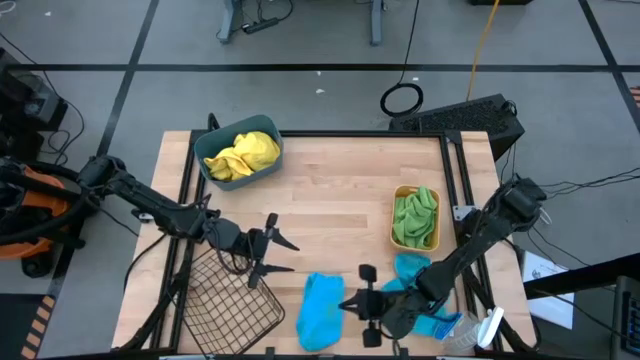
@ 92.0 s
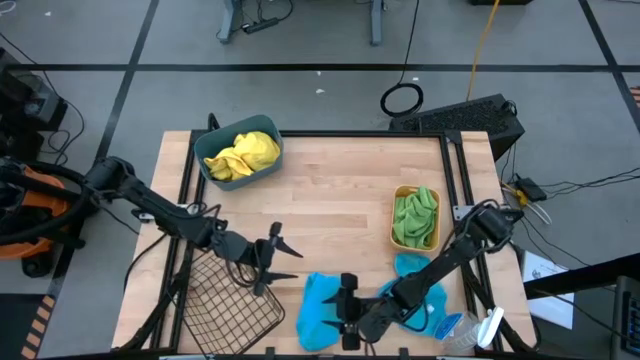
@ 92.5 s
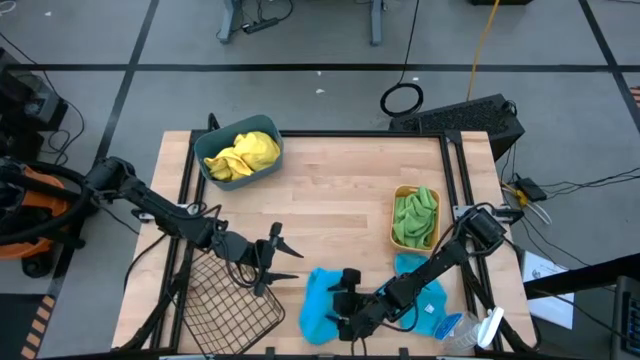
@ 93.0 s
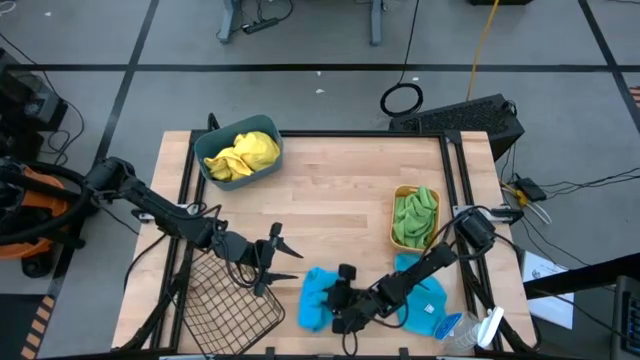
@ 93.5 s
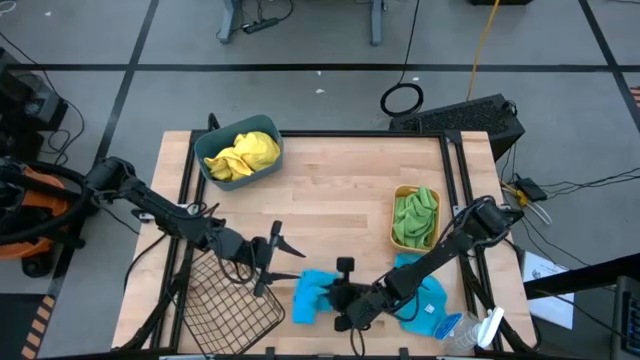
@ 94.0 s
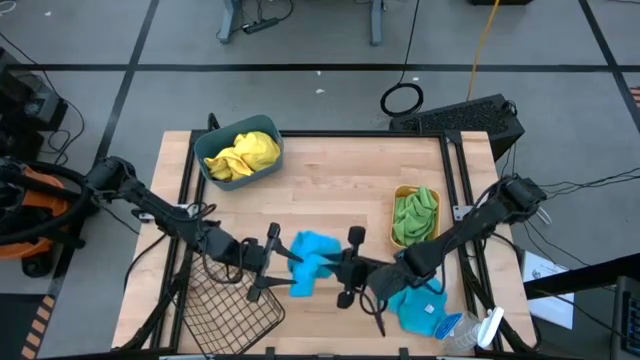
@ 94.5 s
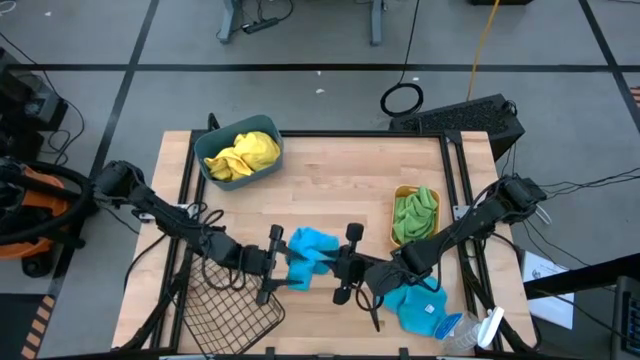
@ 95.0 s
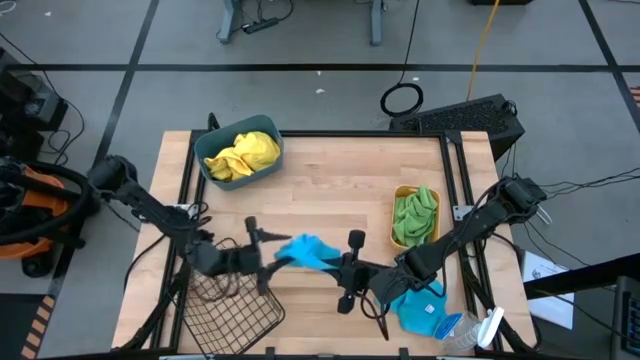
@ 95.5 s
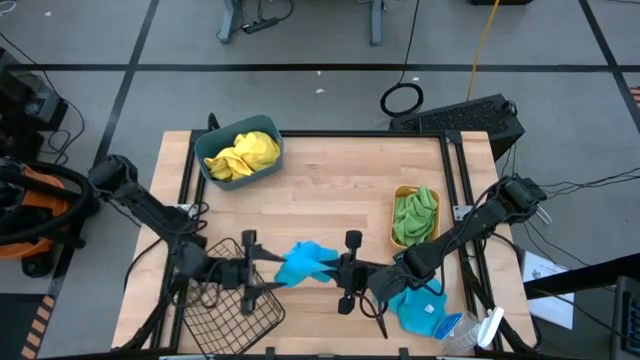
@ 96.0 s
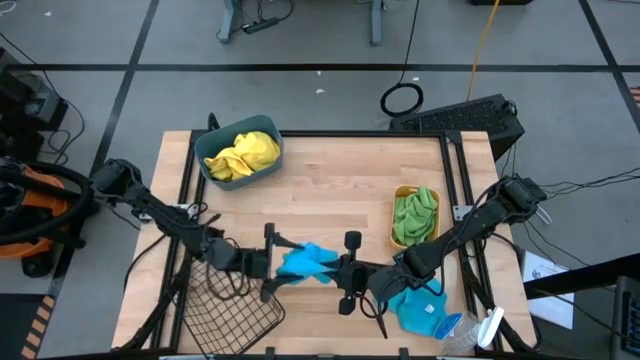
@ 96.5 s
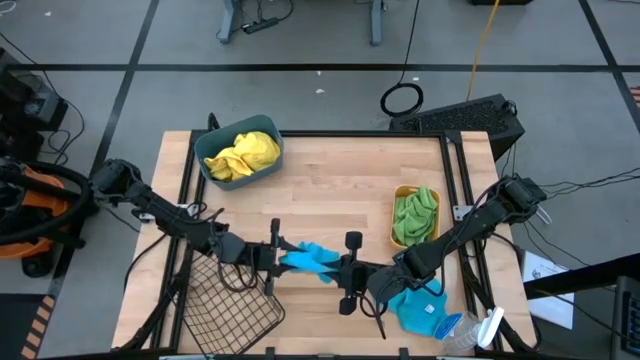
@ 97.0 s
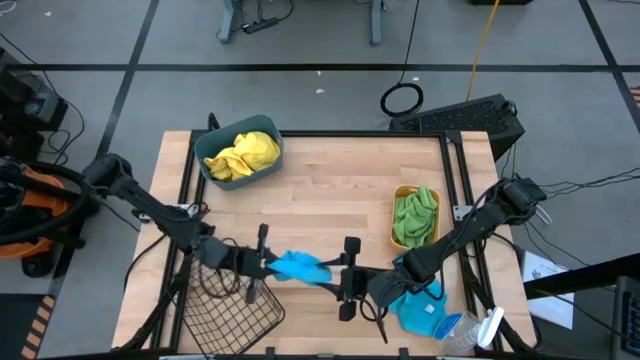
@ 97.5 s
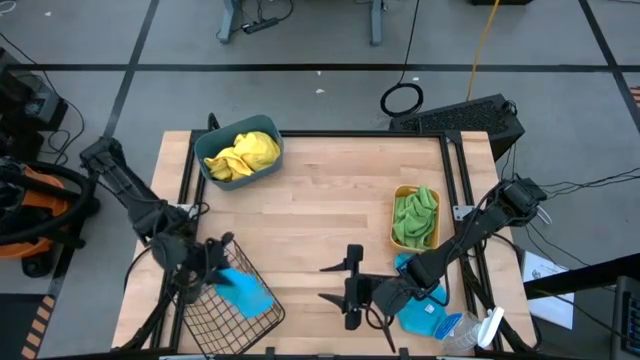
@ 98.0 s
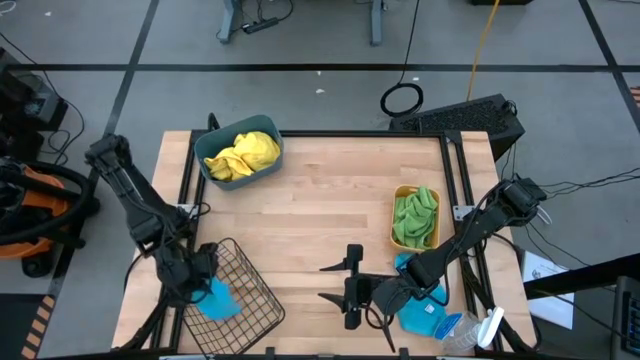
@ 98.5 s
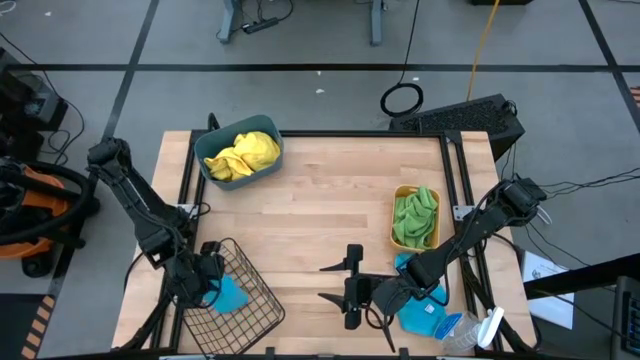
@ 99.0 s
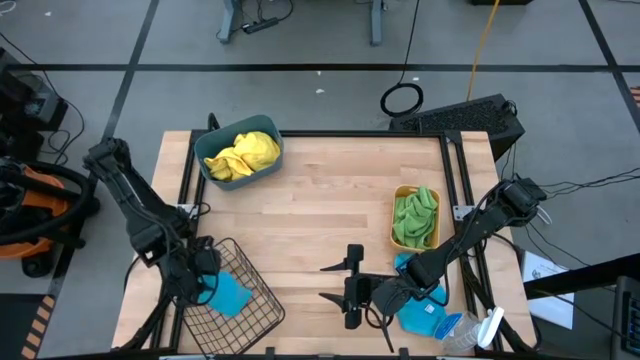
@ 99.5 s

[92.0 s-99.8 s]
Task: Sort microfiber towel by color & place in baskets
Put lower left blue towel into the black basket

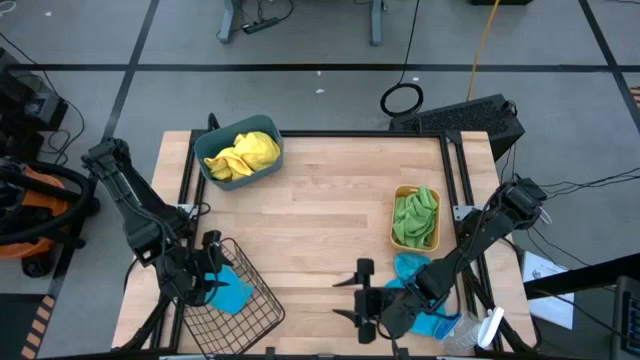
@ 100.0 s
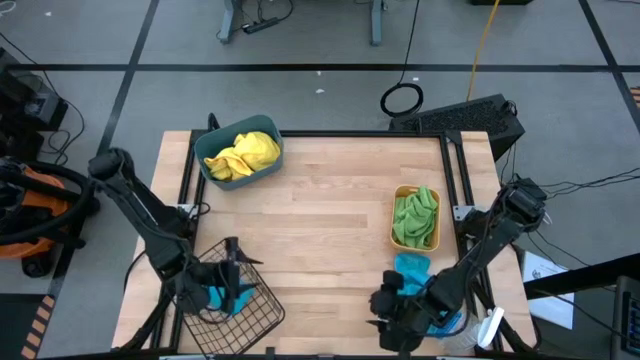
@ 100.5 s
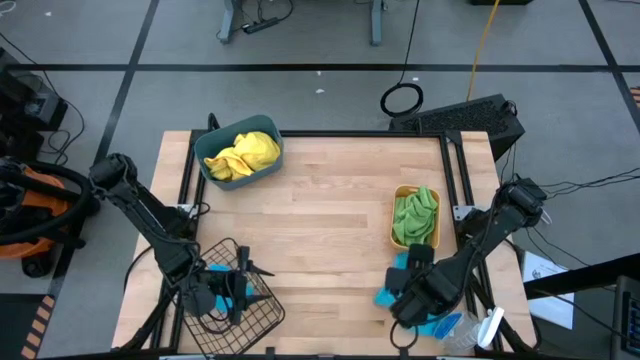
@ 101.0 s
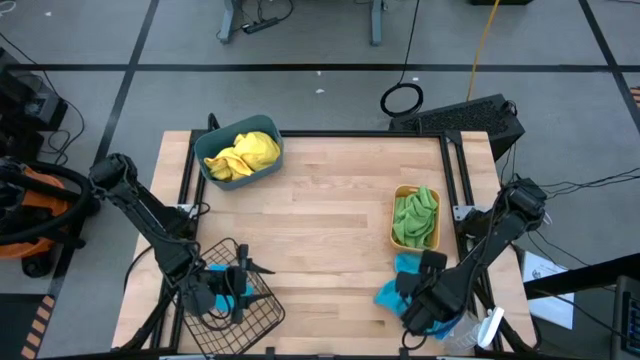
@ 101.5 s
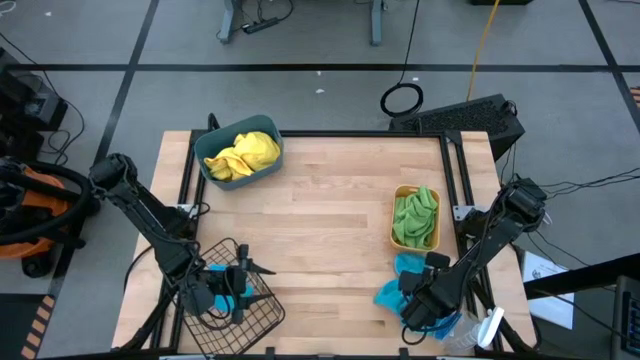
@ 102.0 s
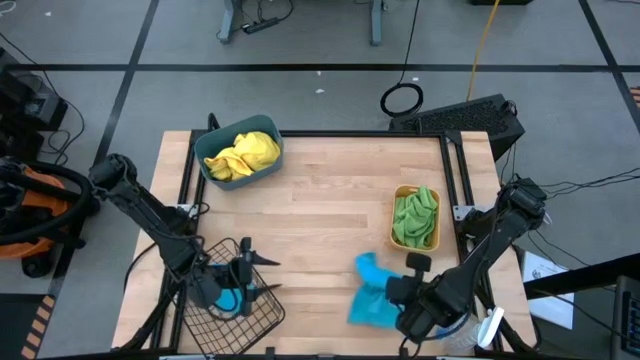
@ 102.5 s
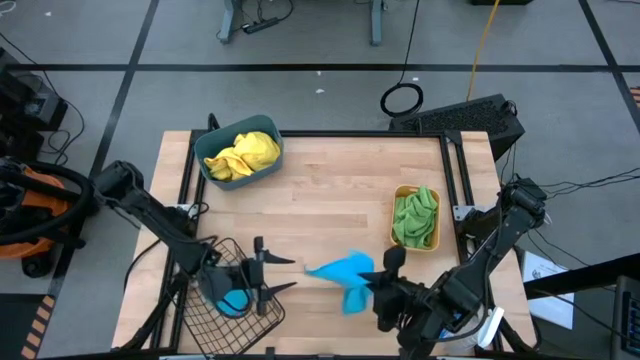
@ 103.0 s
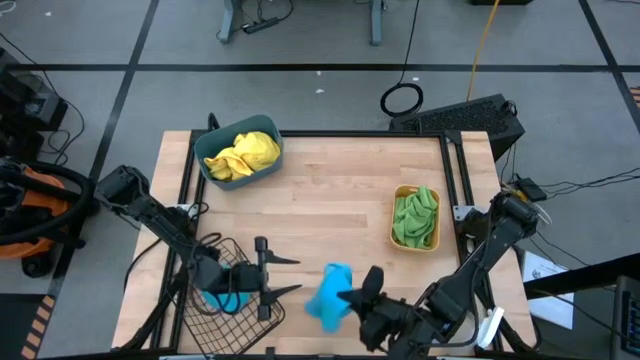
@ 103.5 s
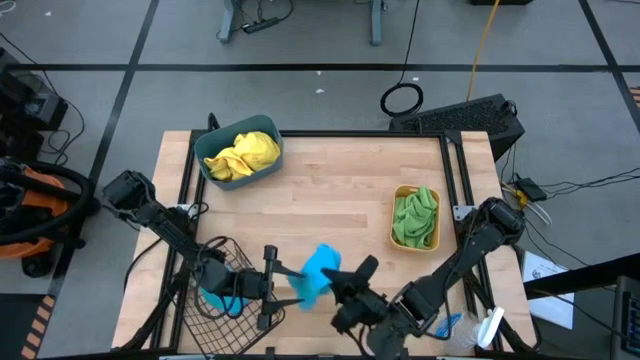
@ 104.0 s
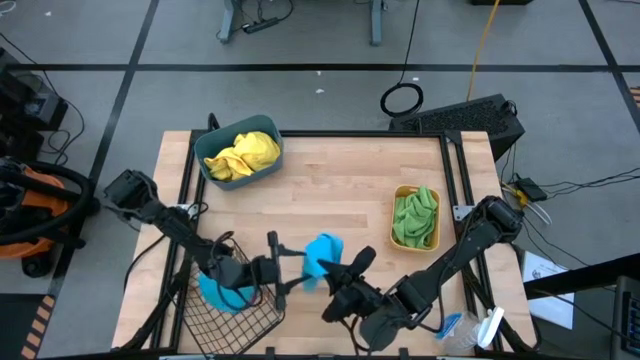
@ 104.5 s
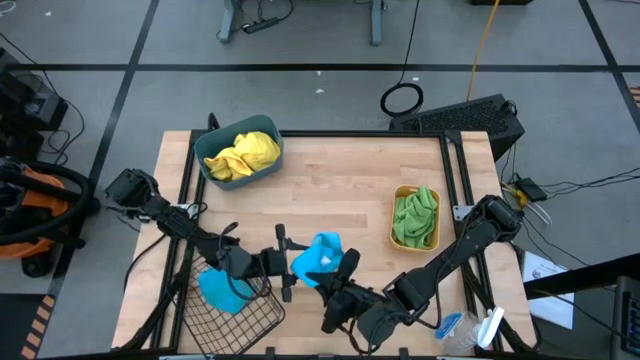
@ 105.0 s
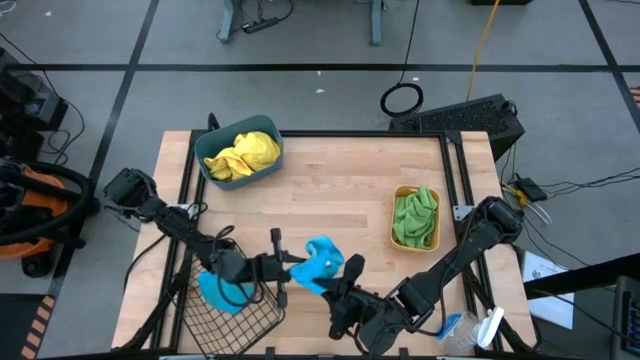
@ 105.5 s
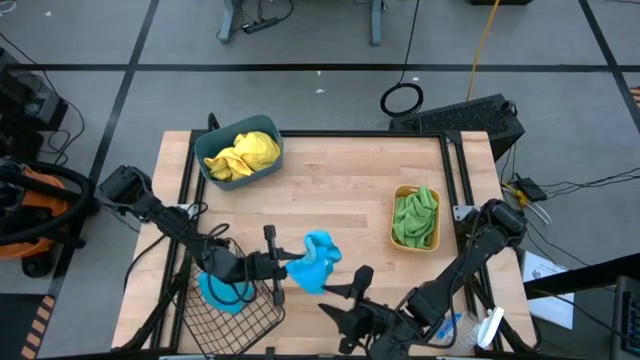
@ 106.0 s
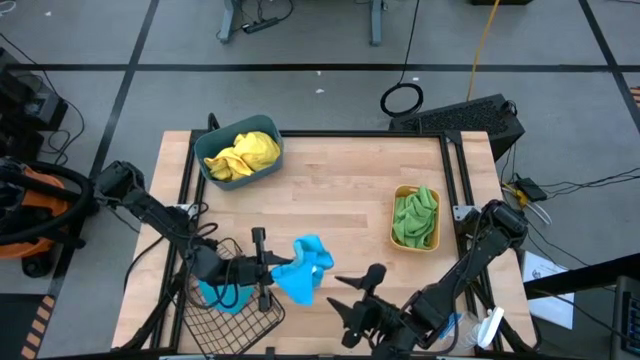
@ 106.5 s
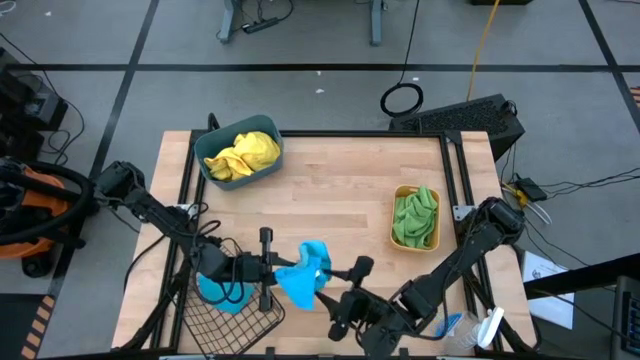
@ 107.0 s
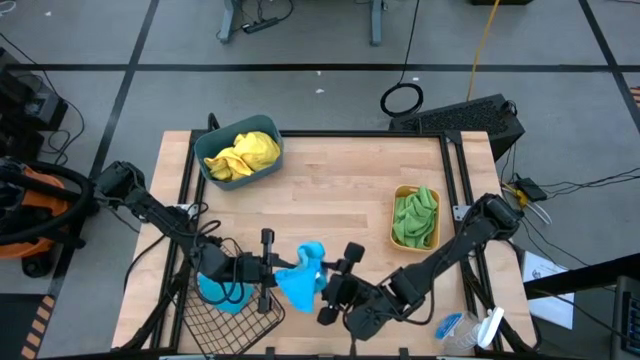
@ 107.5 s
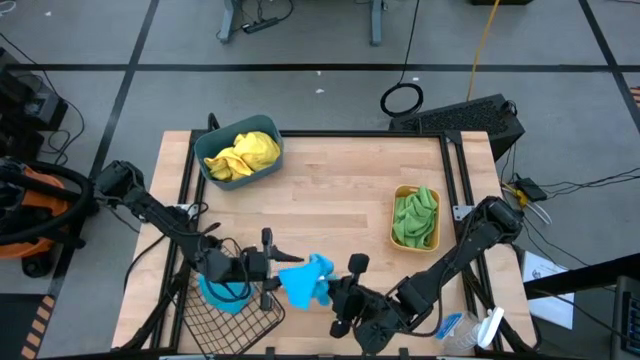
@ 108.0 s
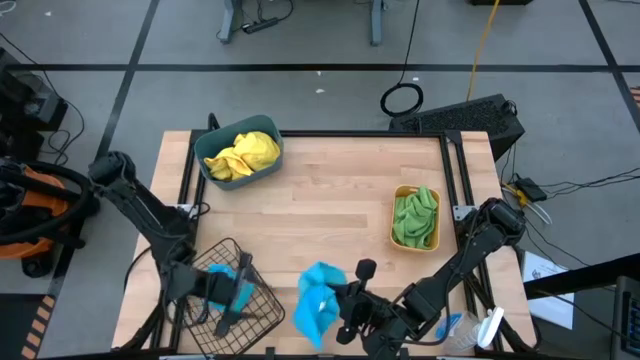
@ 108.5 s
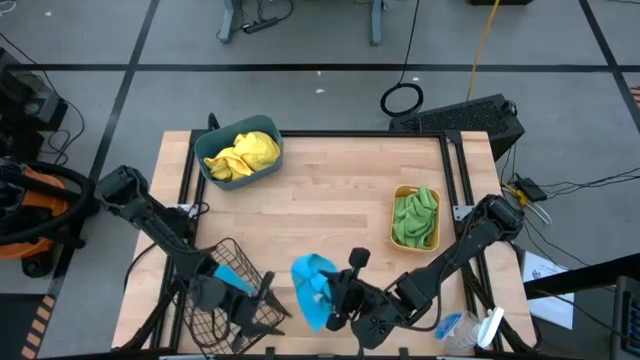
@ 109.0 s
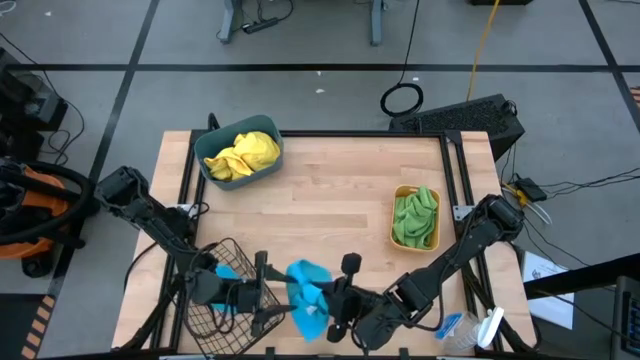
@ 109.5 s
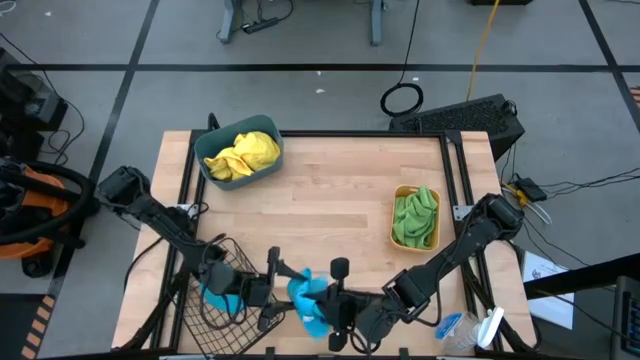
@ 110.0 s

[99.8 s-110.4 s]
Roll lower right blue towel

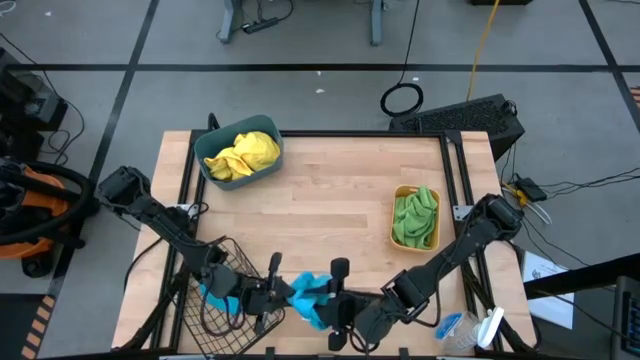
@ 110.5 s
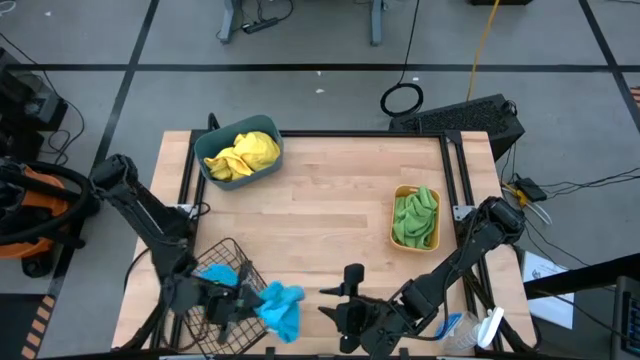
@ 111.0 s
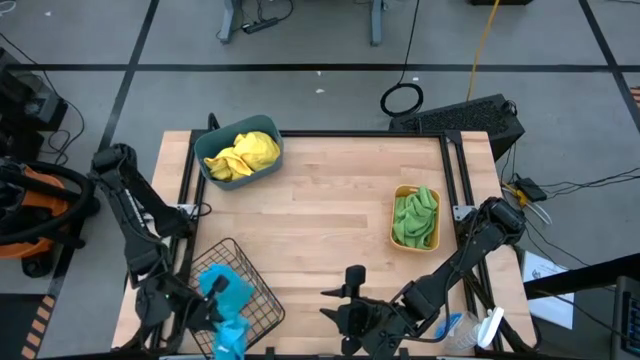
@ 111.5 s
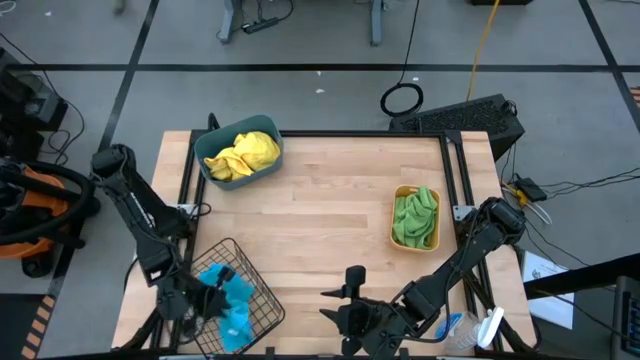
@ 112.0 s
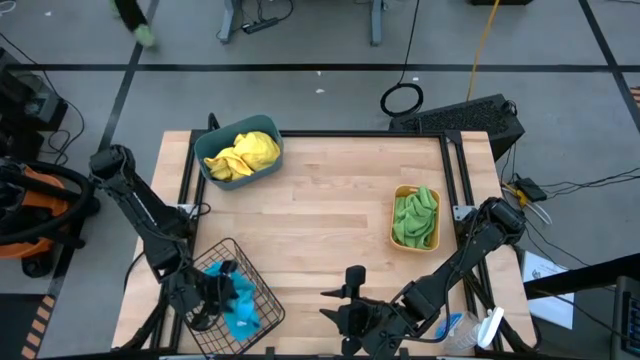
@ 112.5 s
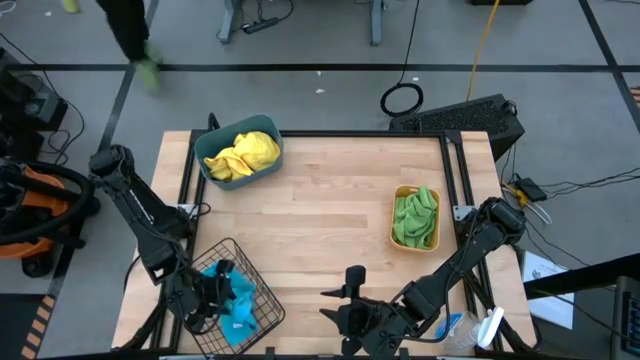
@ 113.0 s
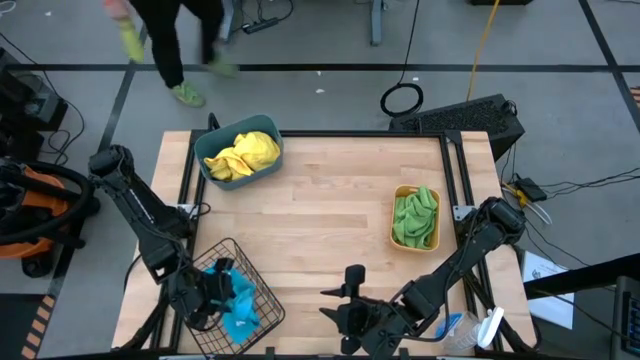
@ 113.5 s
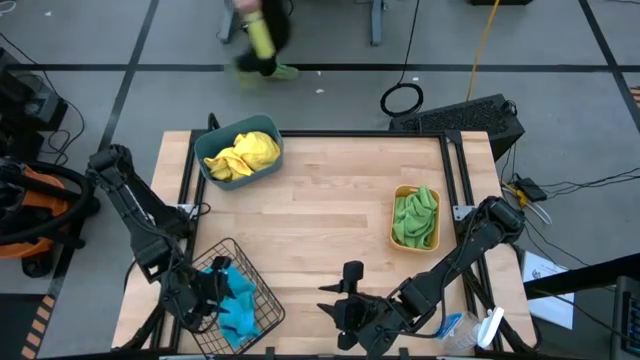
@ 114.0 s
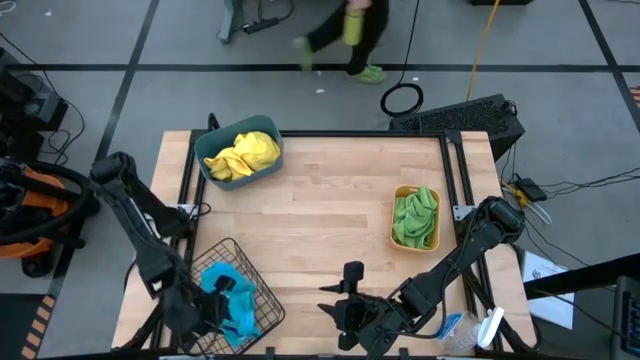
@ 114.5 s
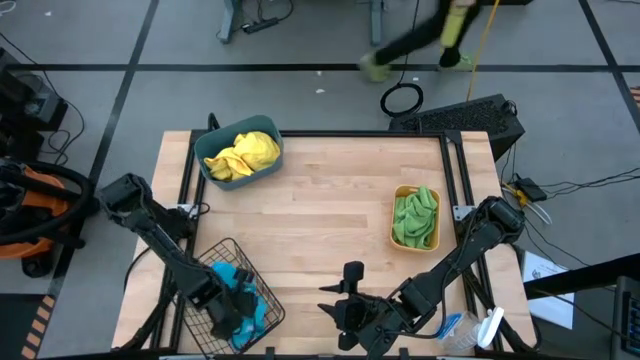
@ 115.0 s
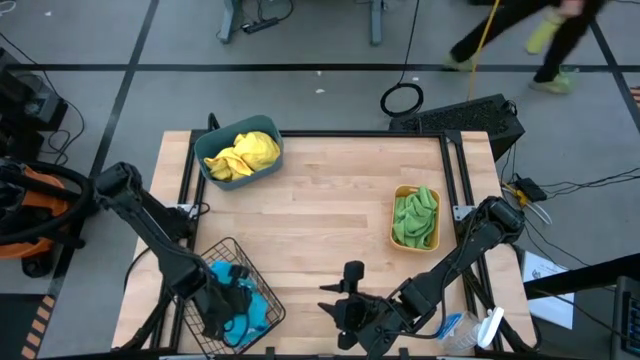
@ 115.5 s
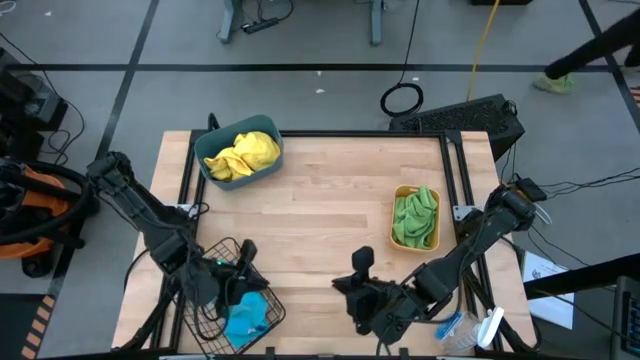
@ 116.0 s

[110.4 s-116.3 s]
Put lower right blue towel into the black basket
